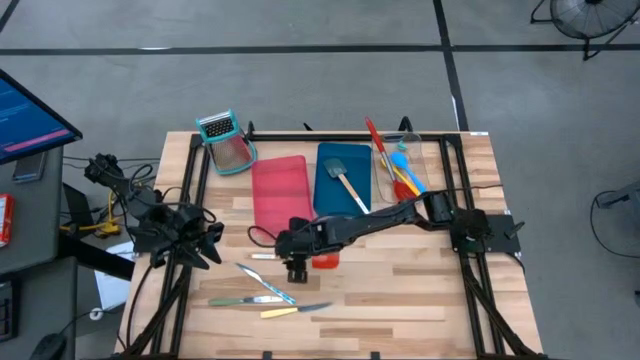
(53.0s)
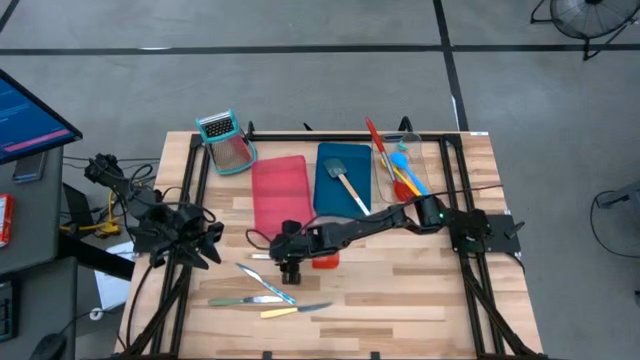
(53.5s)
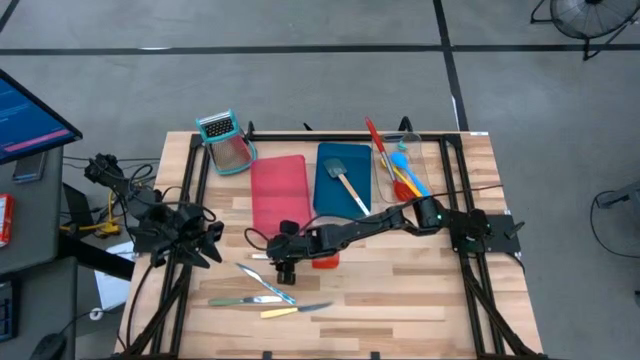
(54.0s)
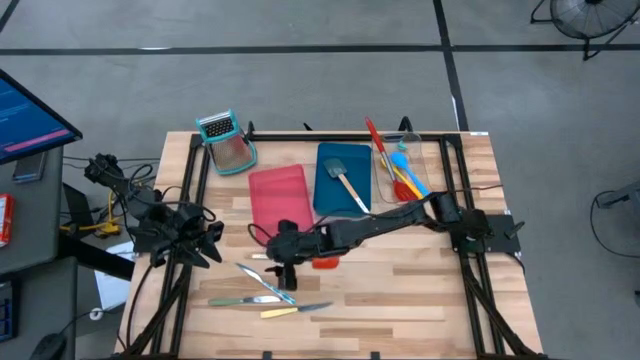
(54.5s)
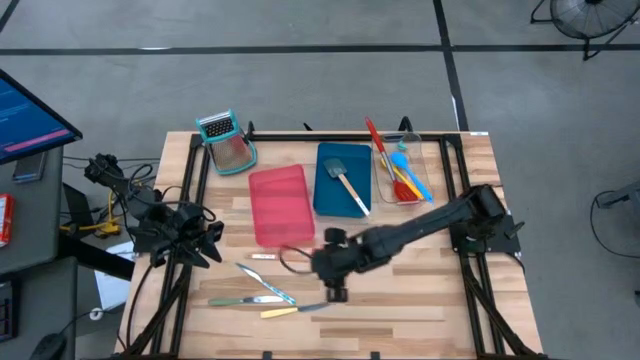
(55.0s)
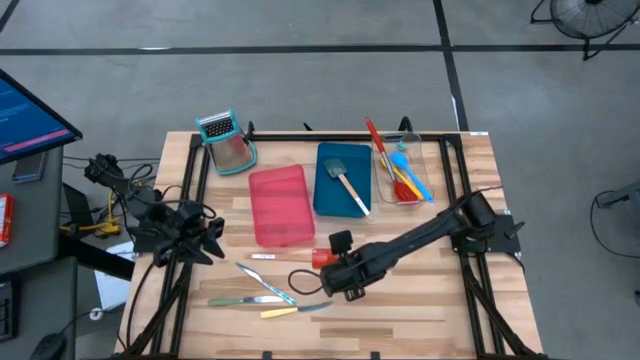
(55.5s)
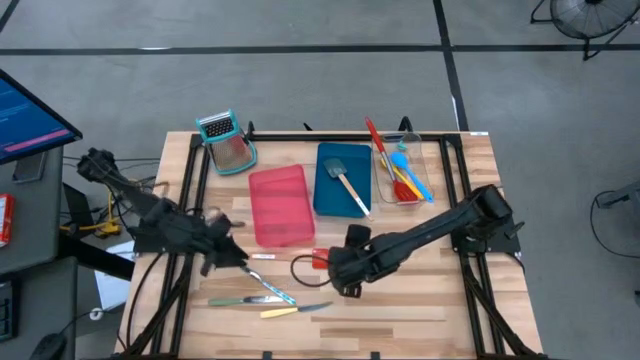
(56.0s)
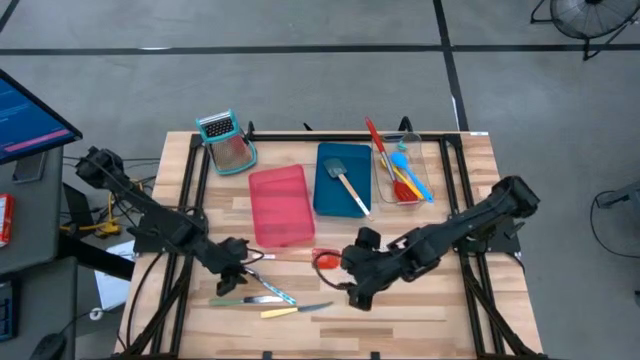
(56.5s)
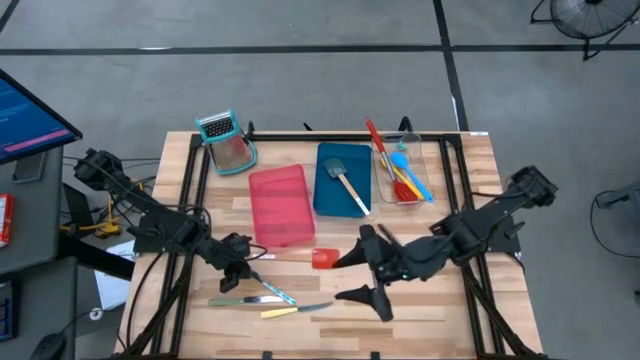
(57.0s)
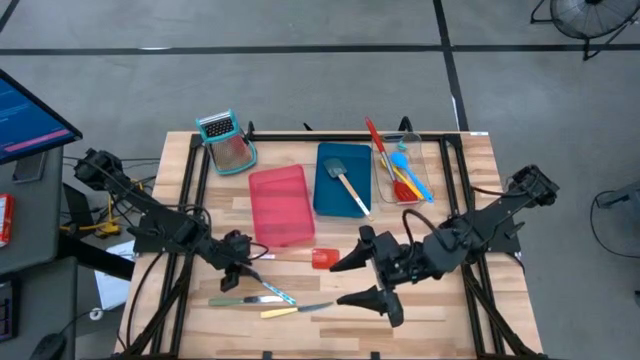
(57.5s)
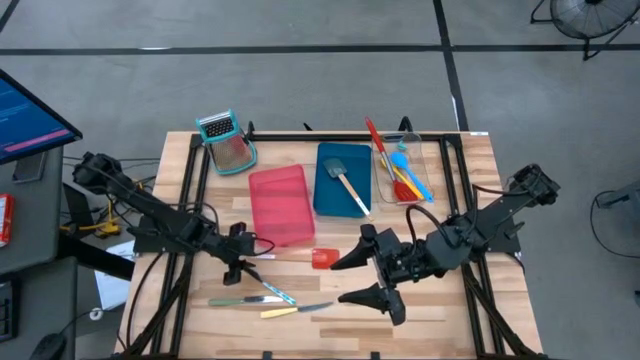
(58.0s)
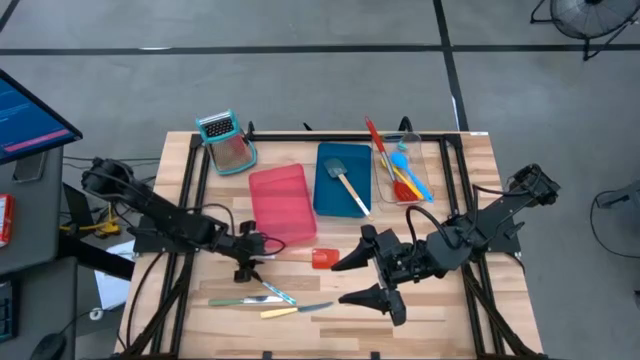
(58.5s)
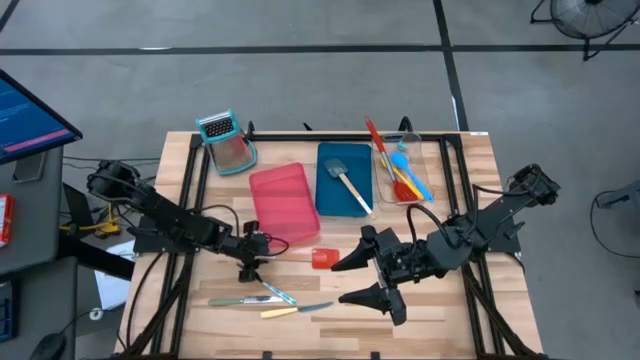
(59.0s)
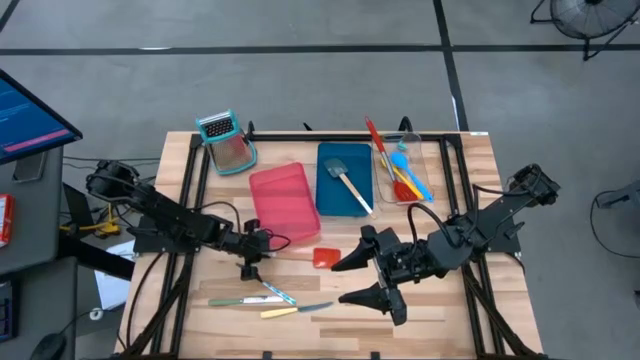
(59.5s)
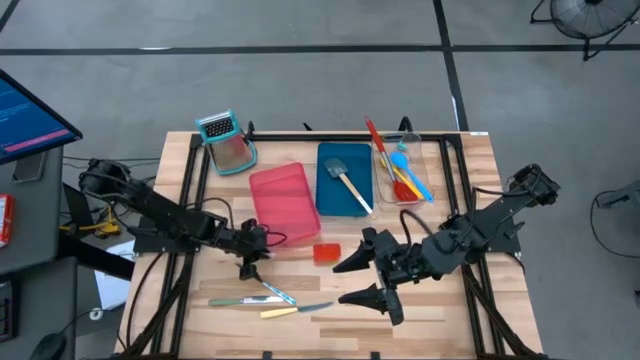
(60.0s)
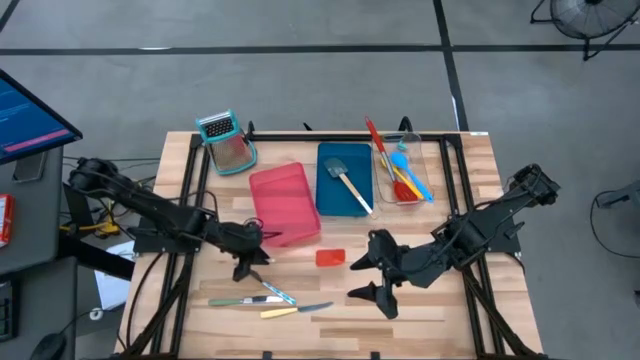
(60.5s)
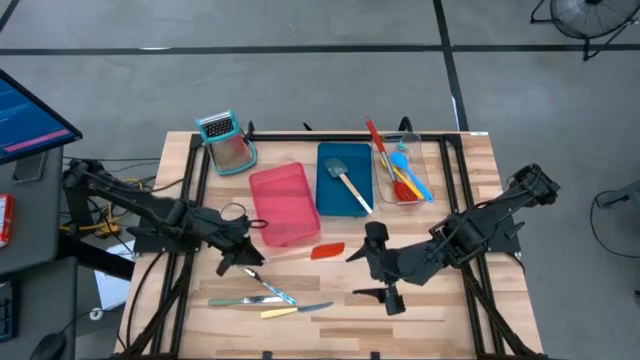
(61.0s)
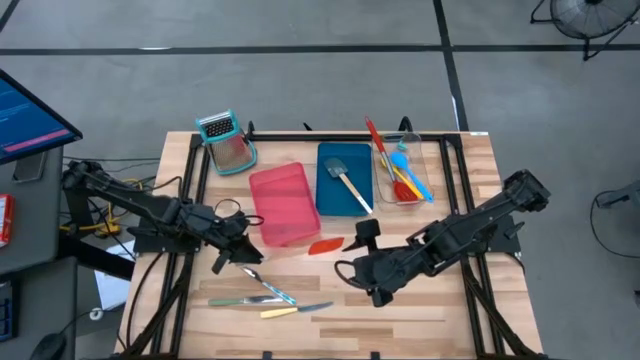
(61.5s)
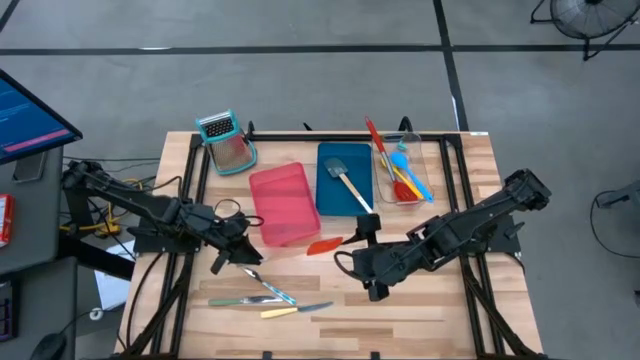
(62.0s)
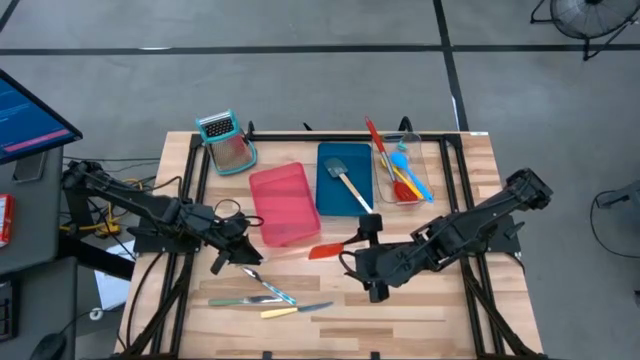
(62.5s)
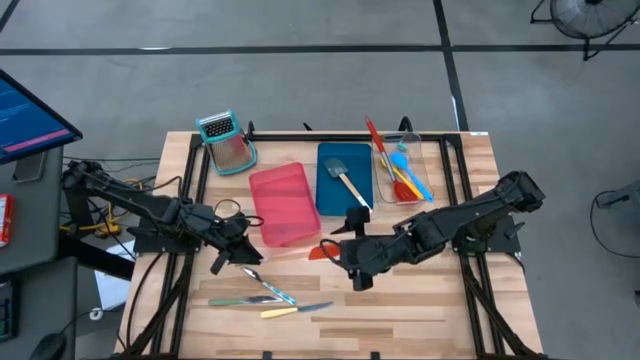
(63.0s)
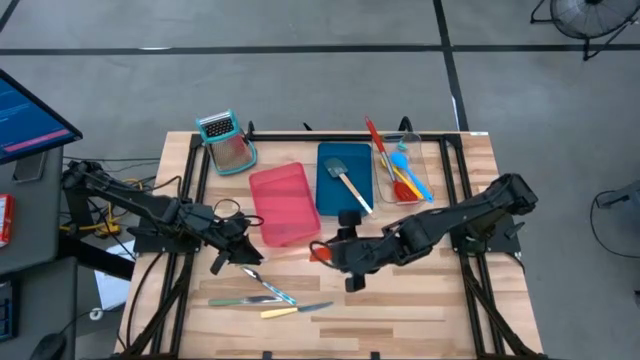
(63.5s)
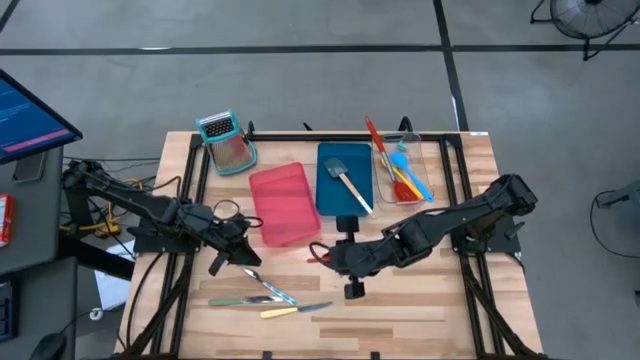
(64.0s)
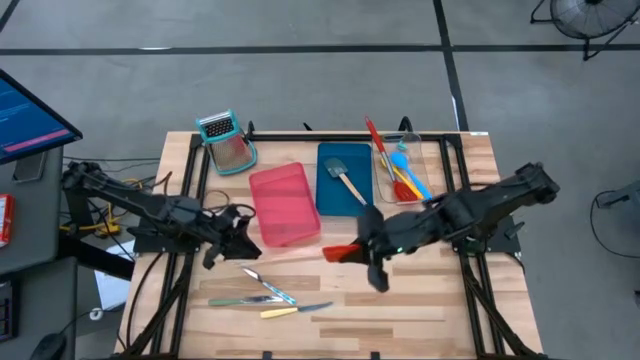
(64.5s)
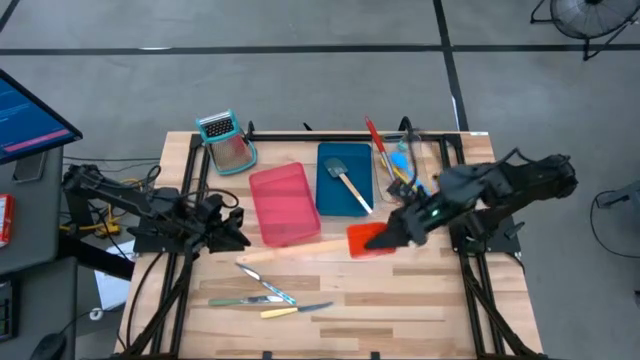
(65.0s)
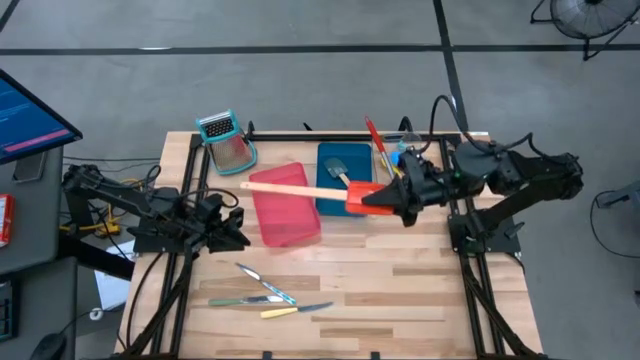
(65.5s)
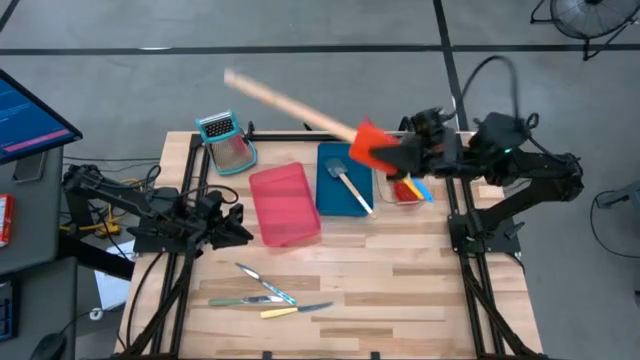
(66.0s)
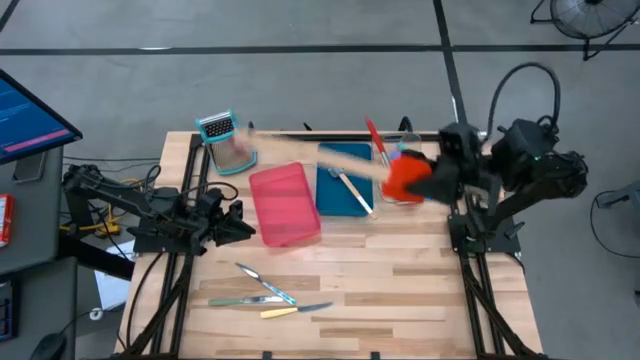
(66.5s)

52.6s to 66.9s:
Task: Pick & Place Kitchen Items
Put the red spatula into the blue bin

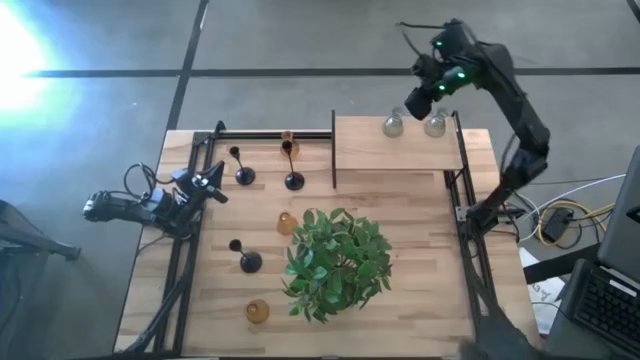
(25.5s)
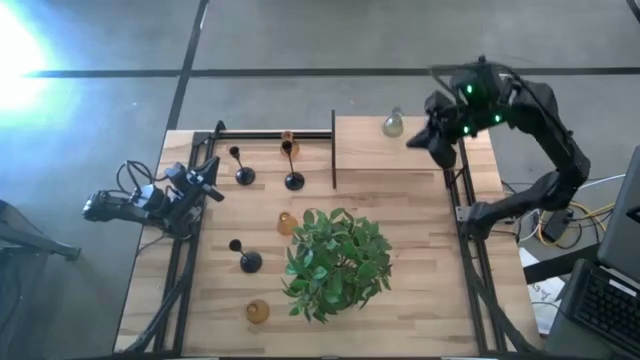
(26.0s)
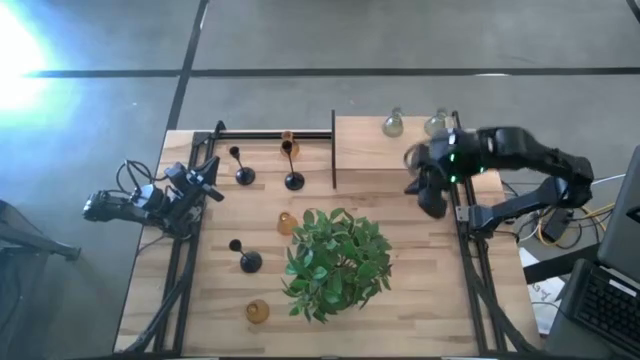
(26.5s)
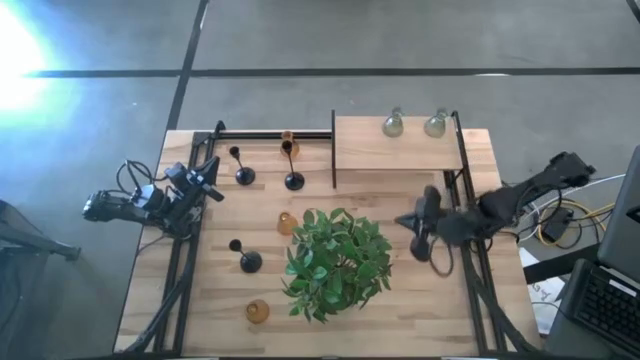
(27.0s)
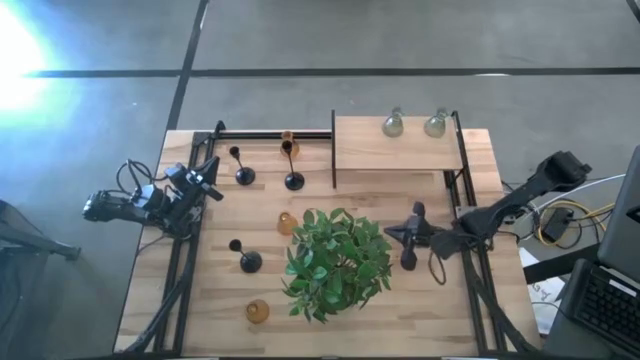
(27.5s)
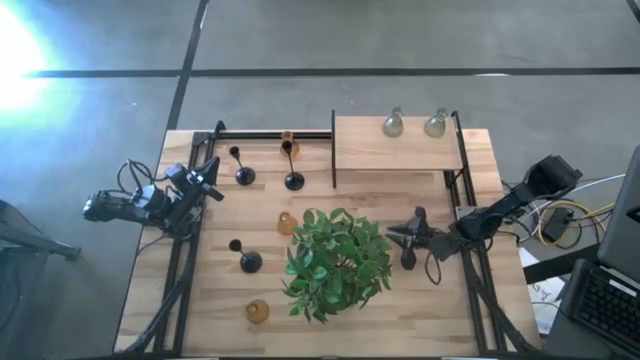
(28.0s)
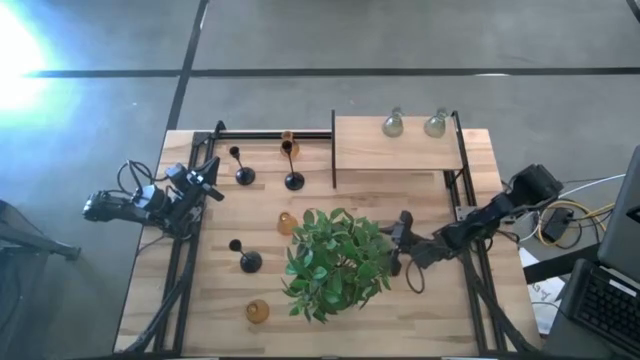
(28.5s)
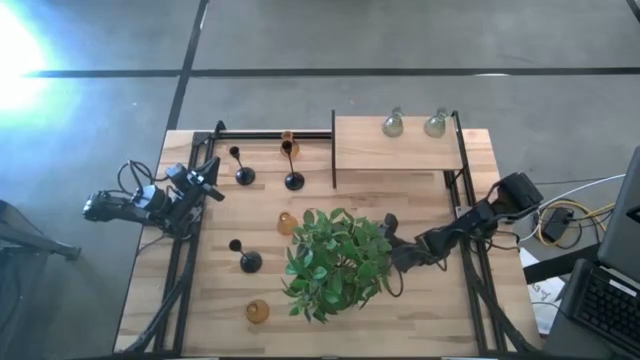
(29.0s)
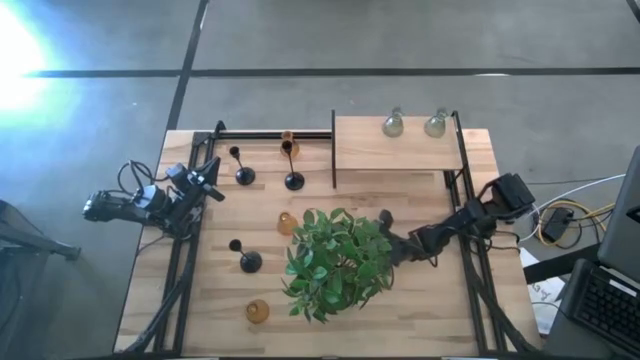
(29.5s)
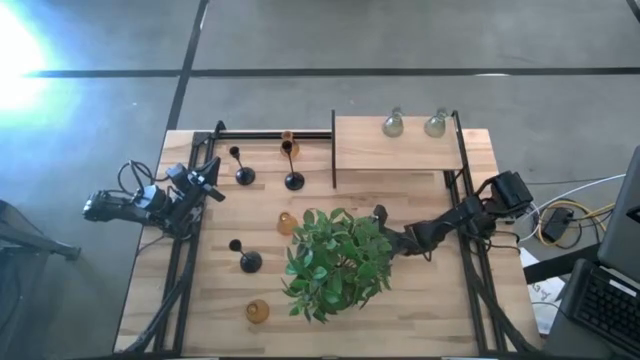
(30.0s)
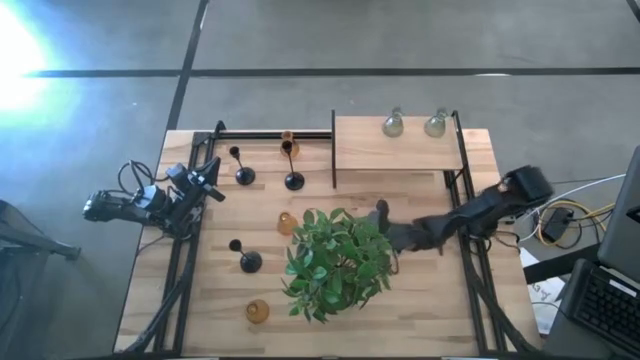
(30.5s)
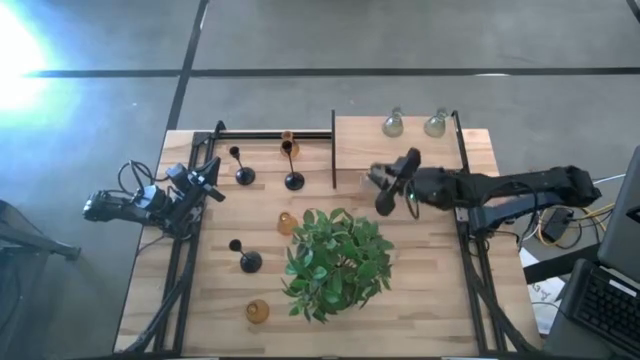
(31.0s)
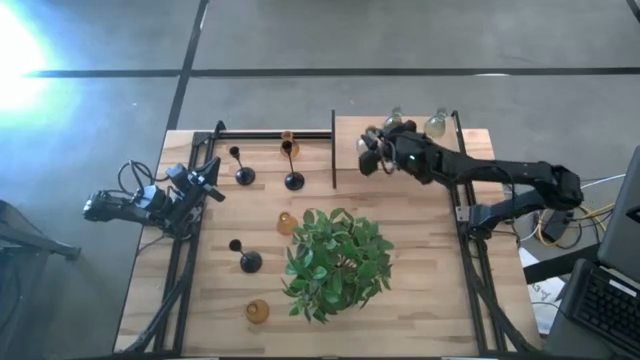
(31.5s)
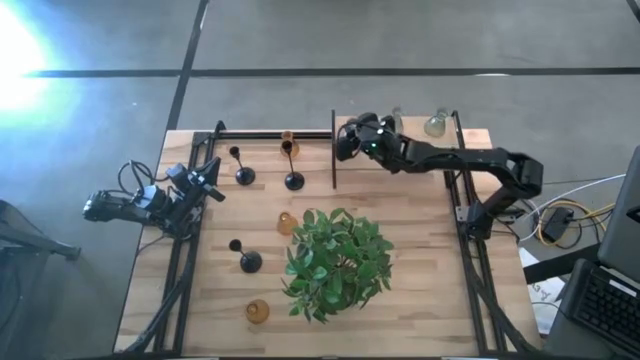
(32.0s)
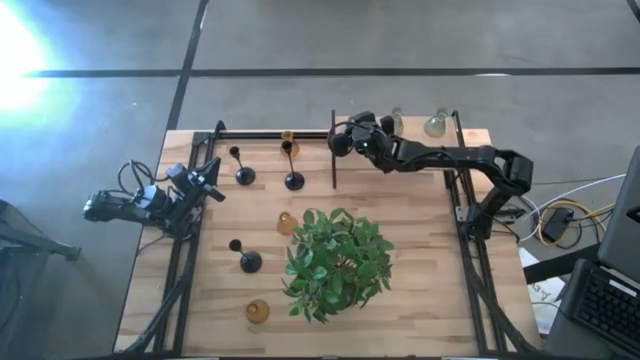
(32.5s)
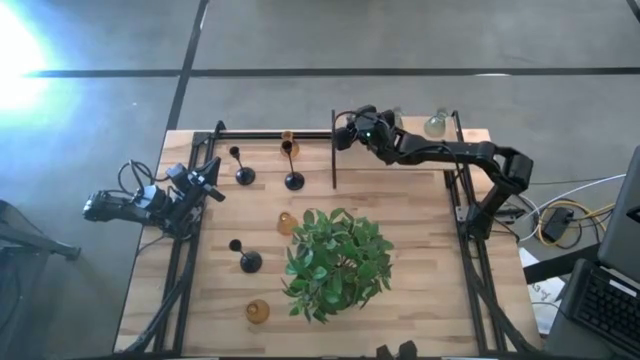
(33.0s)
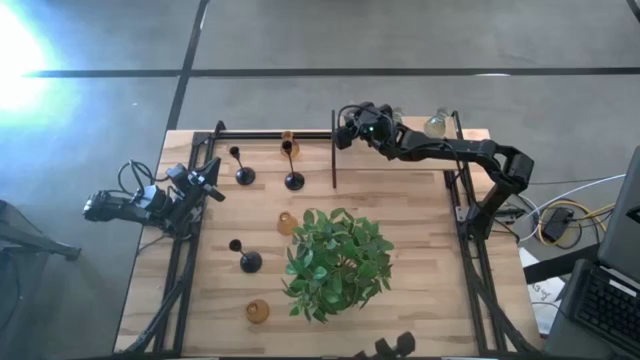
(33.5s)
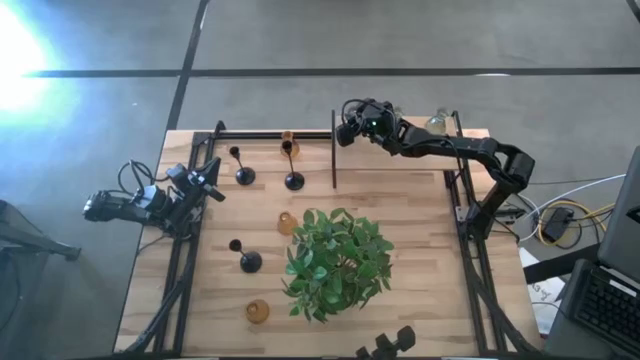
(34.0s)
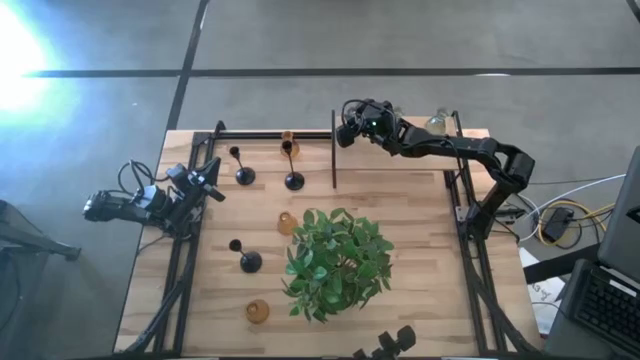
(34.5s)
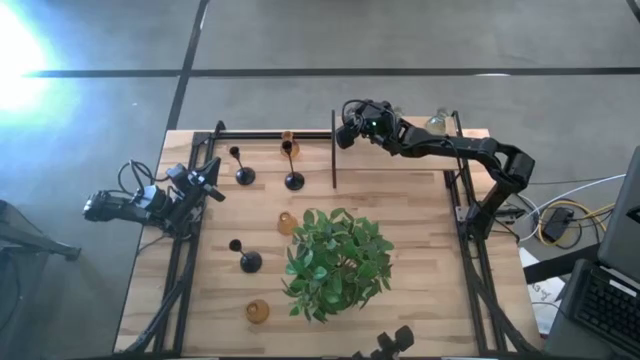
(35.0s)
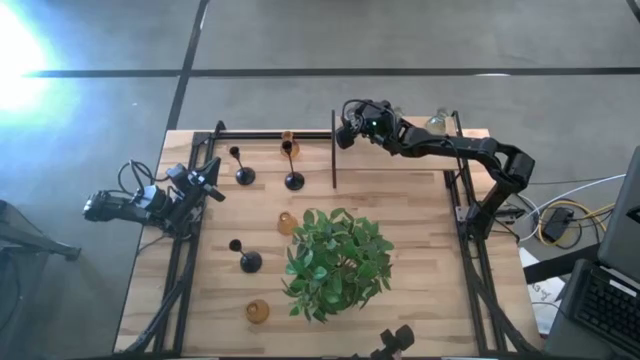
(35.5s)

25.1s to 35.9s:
Task: Pick & Place candle stick holders
Put the transparent glass candle holder on the shelf
